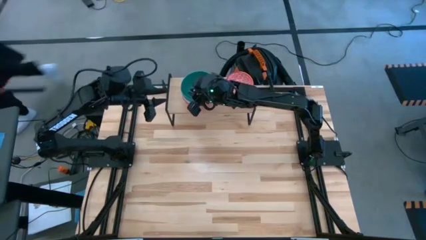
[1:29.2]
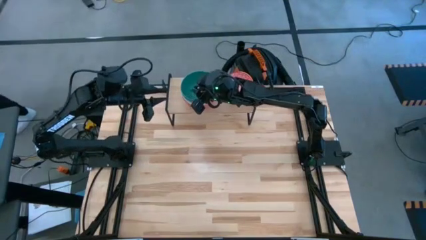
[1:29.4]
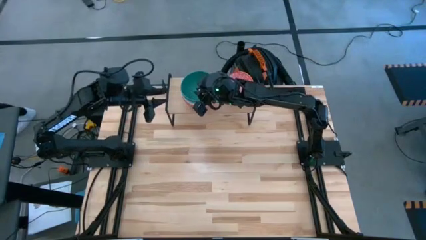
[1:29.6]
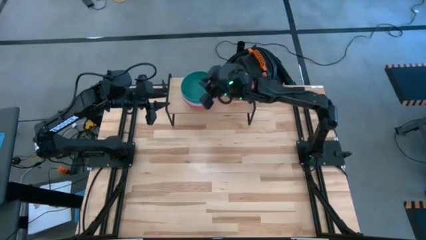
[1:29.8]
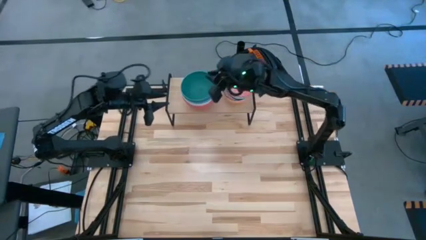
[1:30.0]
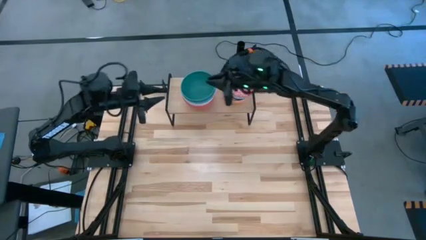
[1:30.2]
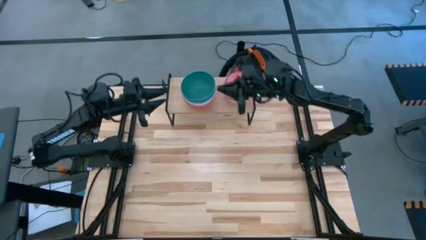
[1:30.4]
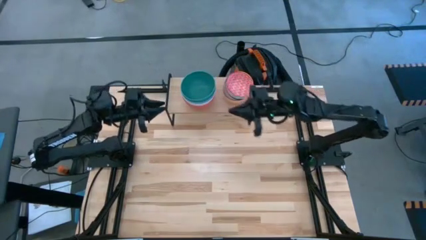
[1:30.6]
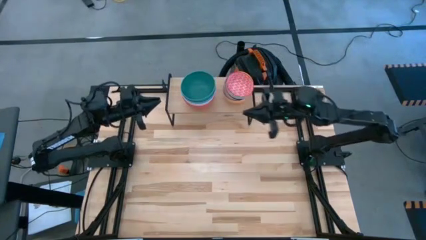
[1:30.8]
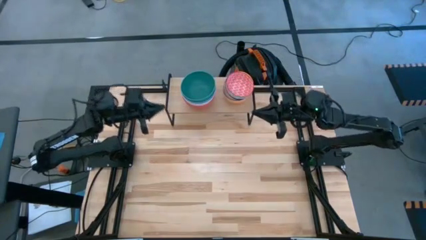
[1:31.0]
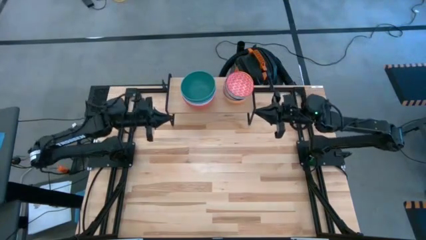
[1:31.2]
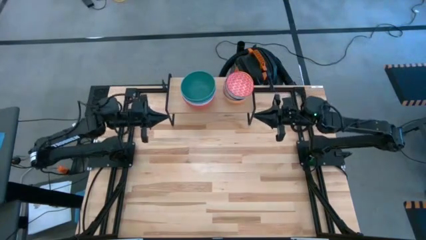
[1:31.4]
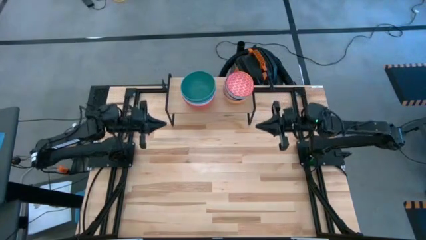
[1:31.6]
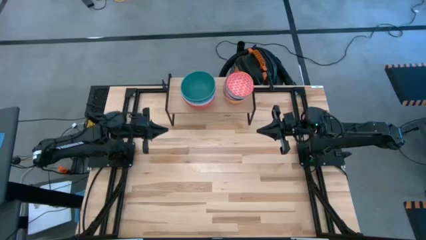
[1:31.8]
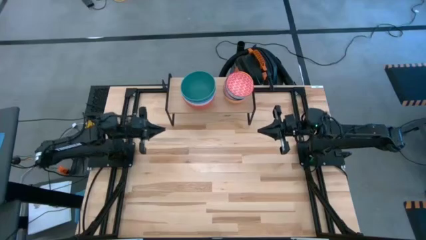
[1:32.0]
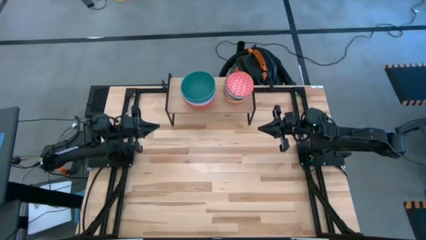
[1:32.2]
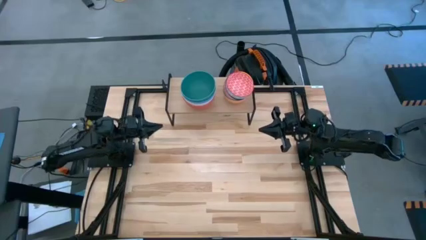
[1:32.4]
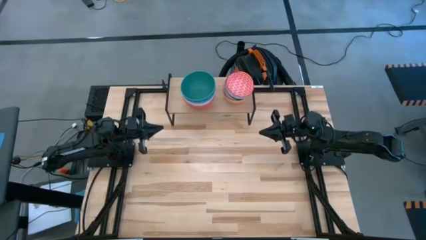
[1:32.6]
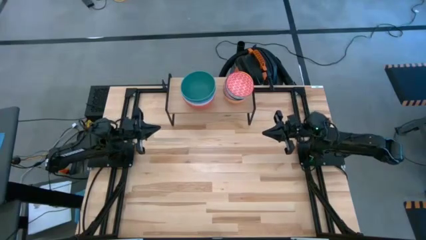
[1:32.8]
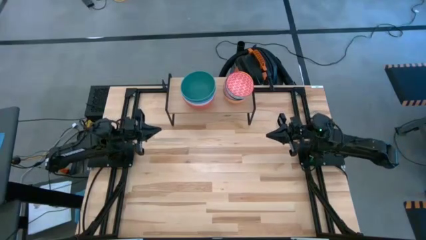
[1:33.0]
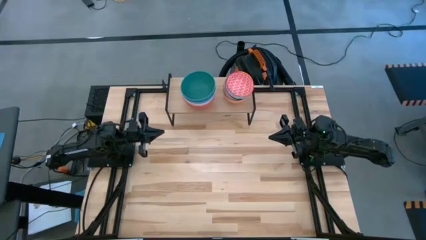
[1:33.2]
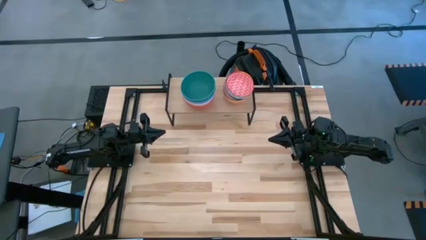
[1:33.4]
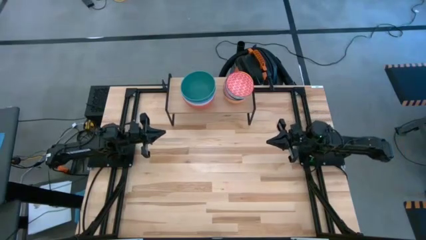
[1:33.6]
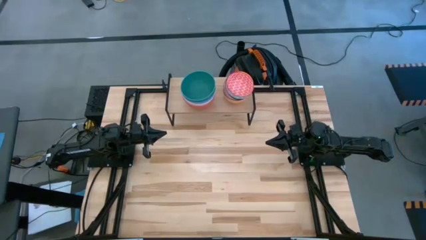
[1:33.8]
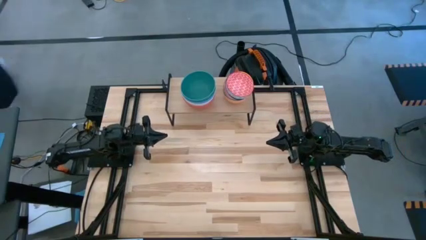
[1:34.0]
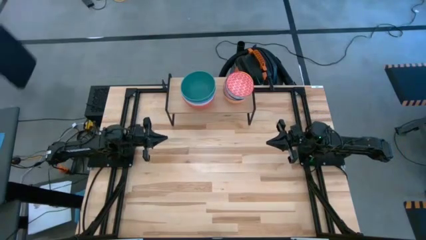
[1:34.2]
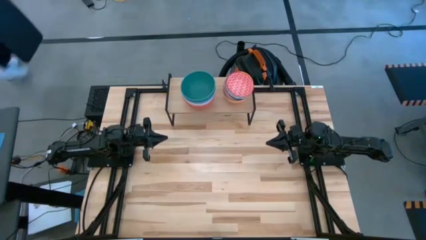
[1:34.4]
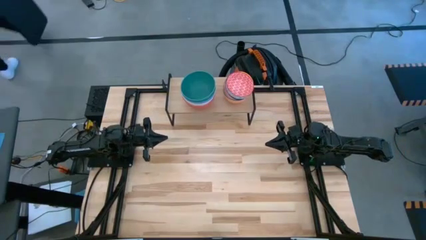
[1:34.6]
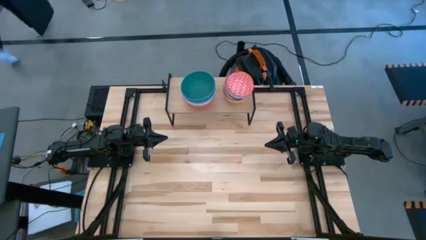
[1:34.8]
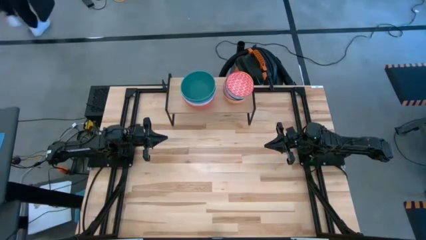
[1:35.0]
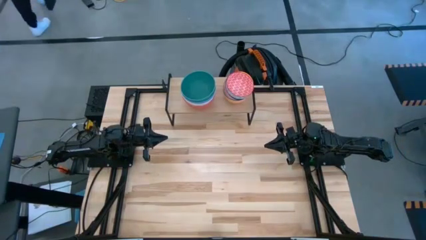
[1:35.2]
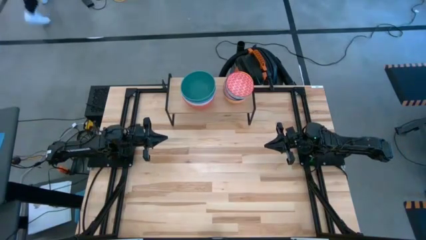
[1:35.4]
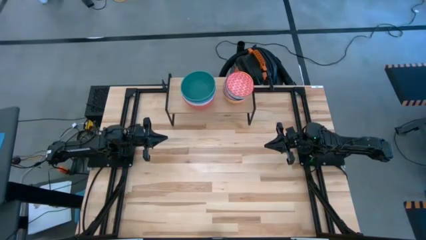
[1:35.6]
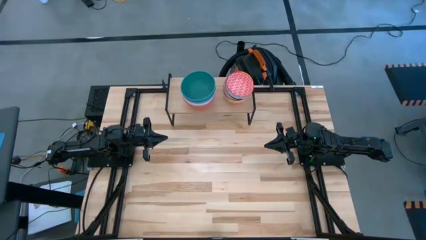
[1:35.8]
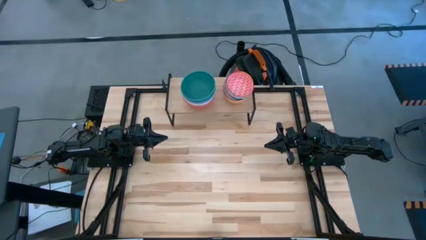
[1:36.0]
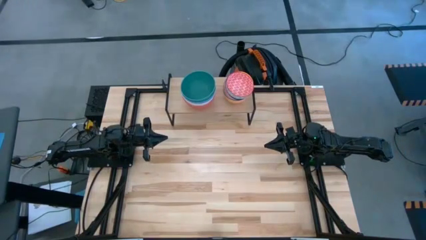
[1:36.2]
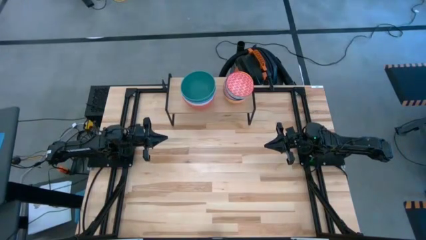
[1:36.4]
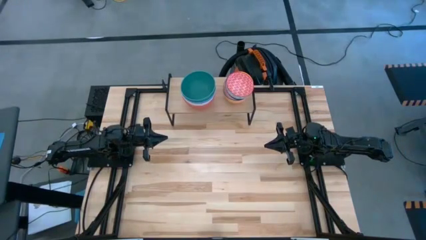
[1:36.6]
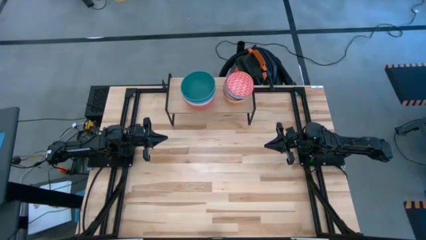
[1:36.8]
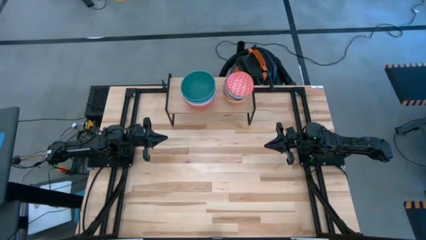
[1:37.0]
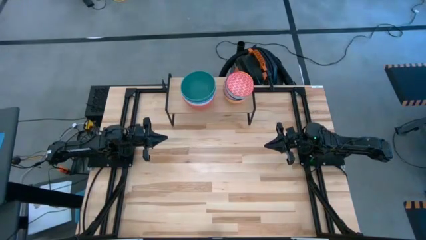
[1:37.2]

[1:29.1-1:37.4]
Task: Place and stack bowls onto a shelf
Return to Home Position

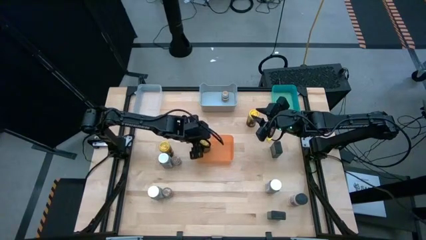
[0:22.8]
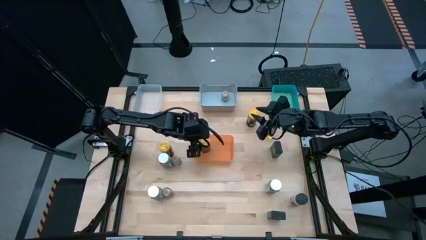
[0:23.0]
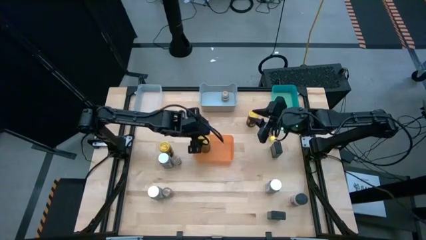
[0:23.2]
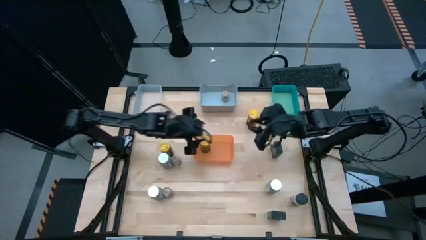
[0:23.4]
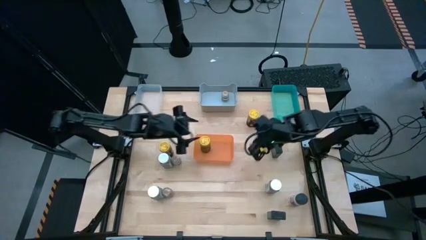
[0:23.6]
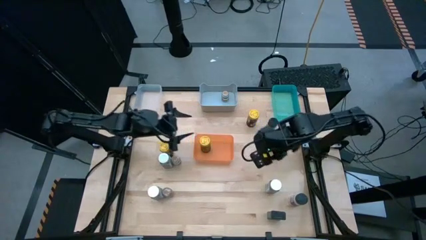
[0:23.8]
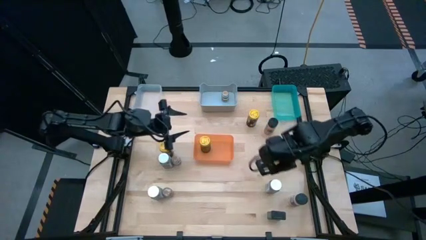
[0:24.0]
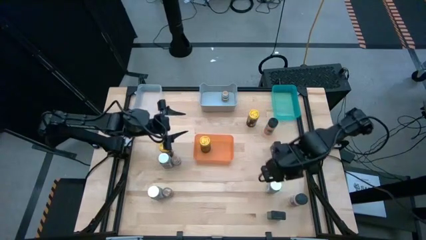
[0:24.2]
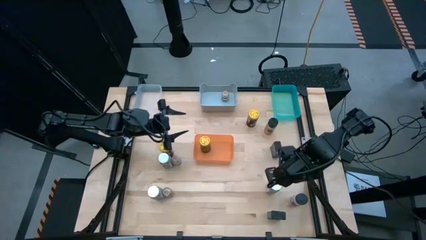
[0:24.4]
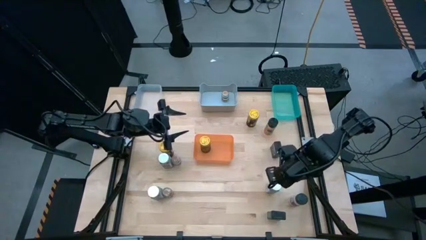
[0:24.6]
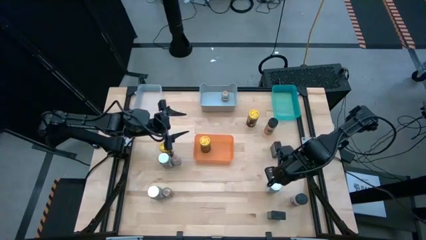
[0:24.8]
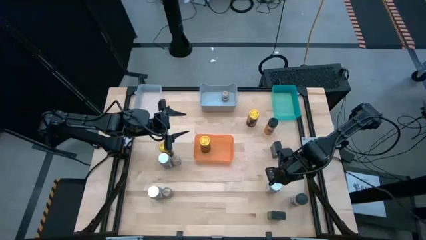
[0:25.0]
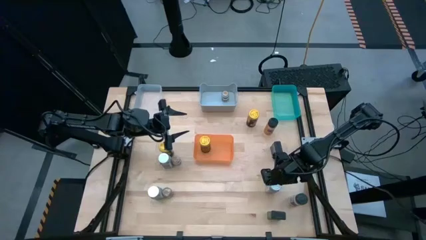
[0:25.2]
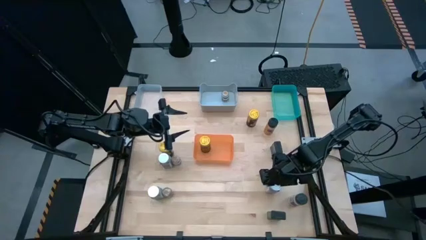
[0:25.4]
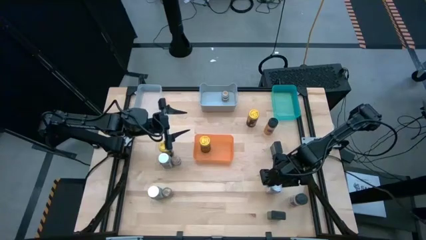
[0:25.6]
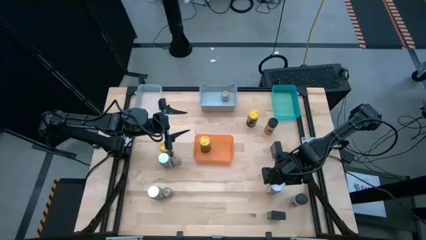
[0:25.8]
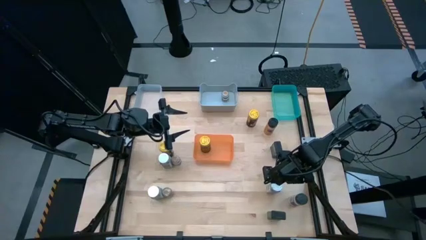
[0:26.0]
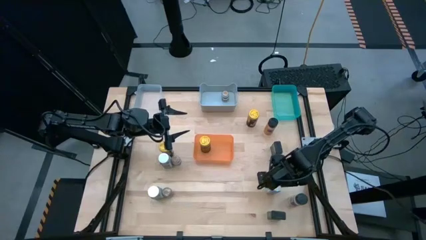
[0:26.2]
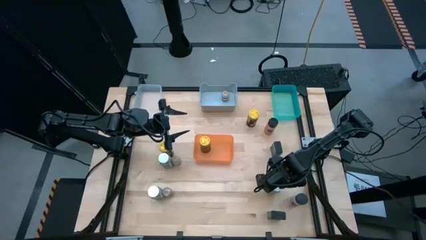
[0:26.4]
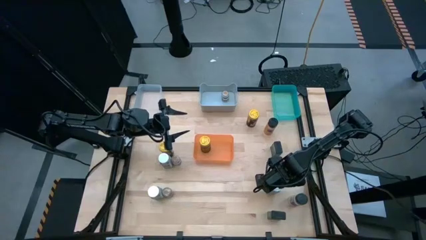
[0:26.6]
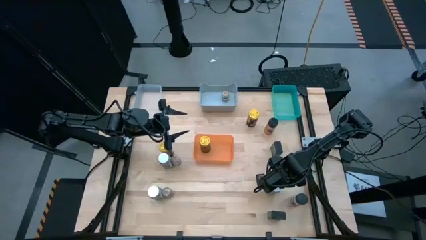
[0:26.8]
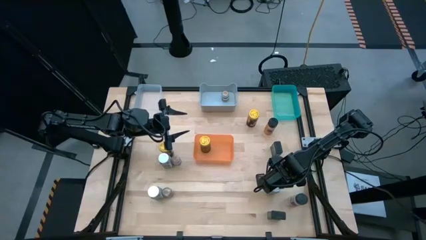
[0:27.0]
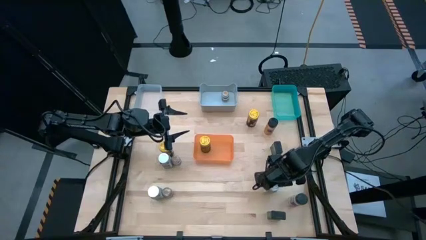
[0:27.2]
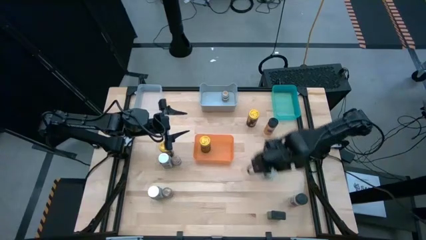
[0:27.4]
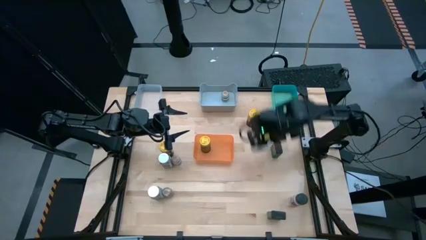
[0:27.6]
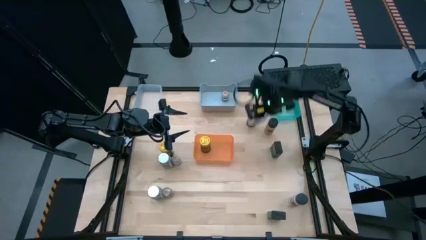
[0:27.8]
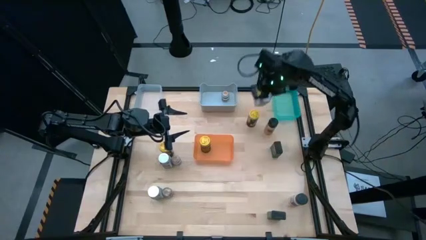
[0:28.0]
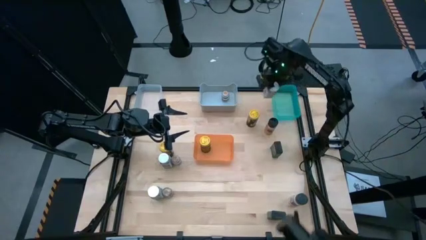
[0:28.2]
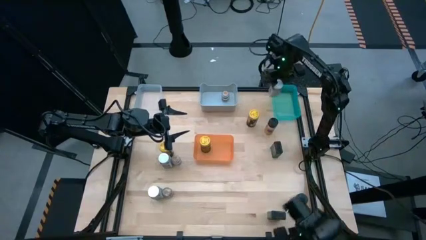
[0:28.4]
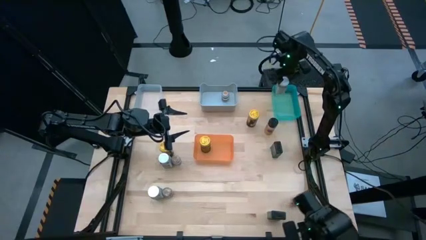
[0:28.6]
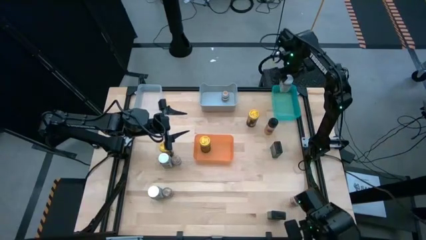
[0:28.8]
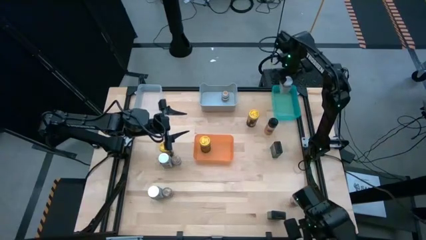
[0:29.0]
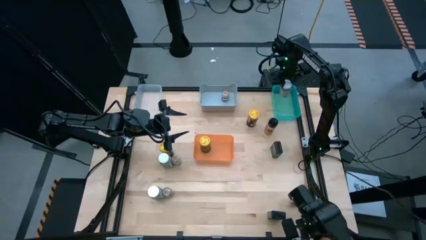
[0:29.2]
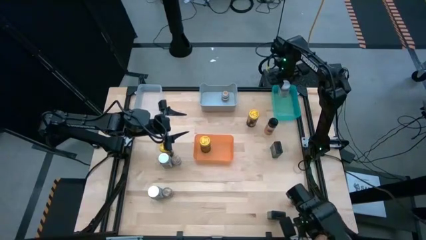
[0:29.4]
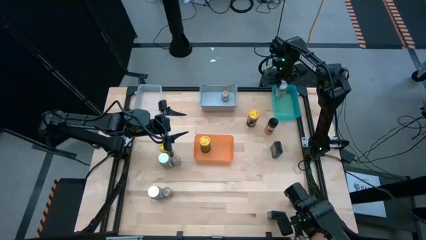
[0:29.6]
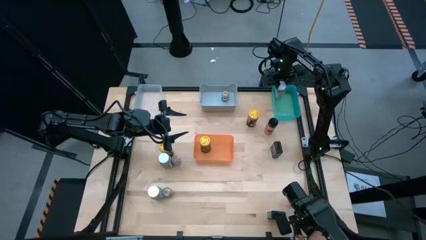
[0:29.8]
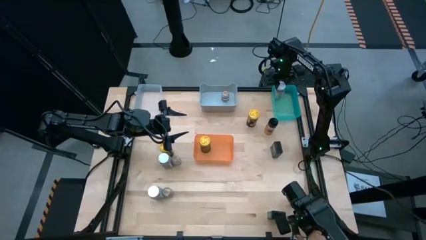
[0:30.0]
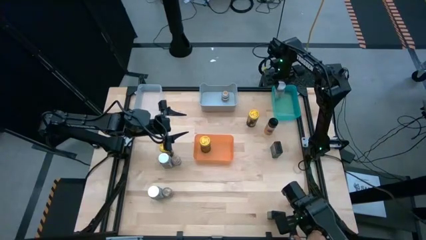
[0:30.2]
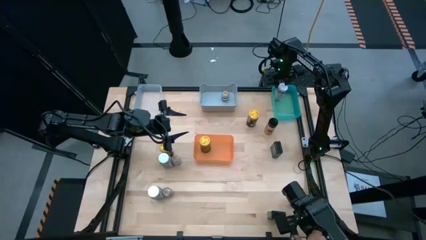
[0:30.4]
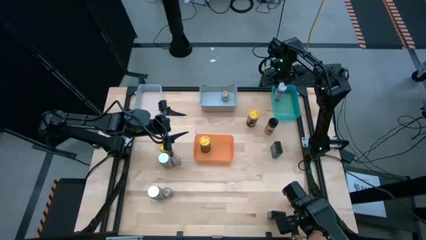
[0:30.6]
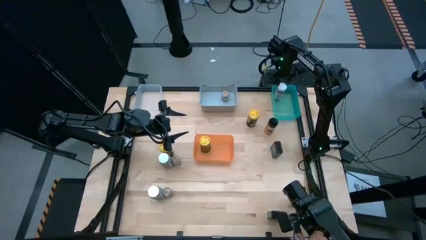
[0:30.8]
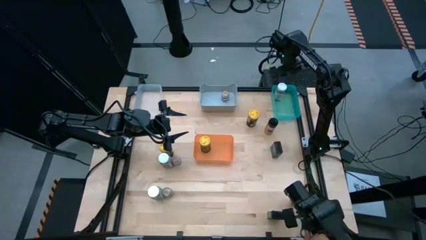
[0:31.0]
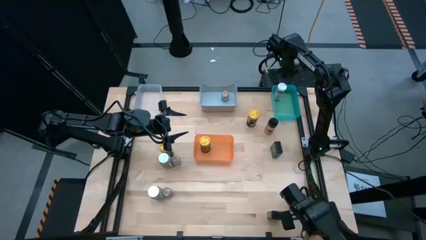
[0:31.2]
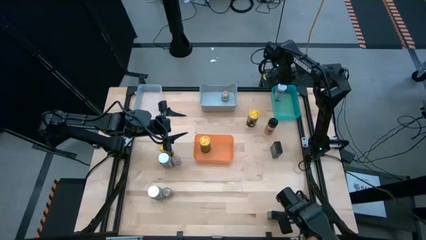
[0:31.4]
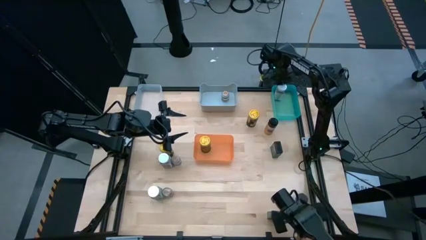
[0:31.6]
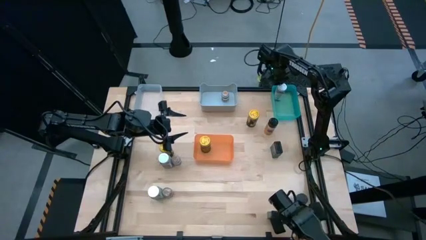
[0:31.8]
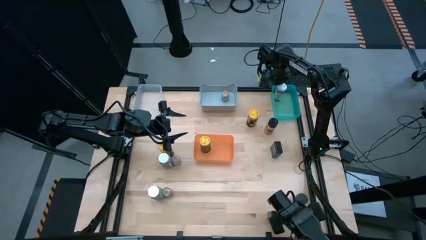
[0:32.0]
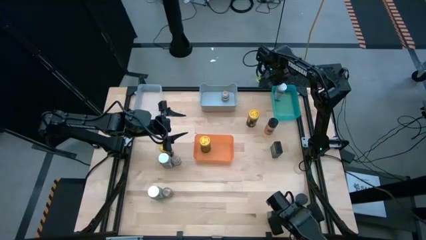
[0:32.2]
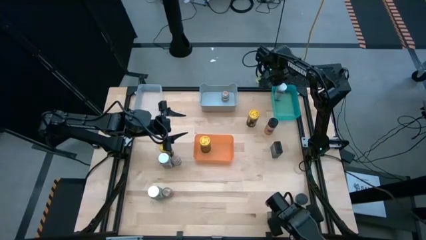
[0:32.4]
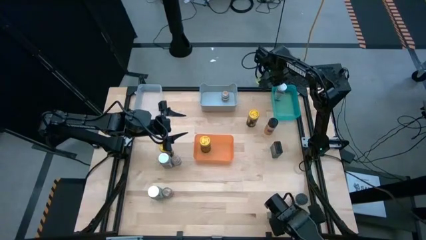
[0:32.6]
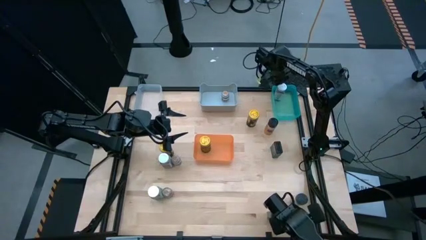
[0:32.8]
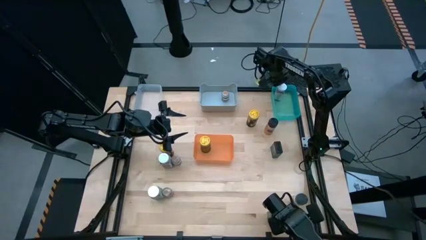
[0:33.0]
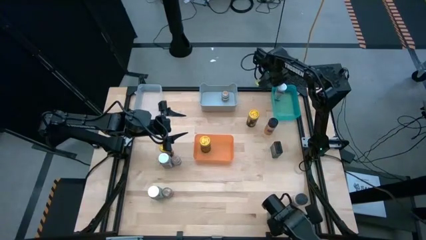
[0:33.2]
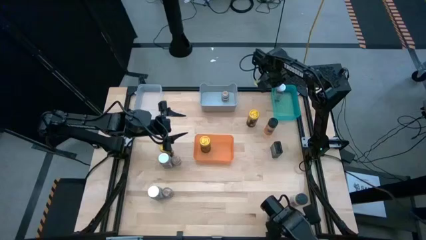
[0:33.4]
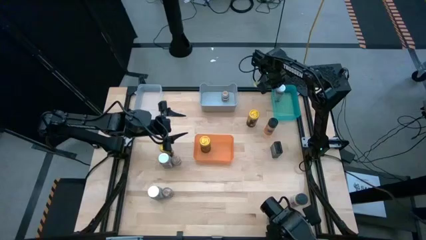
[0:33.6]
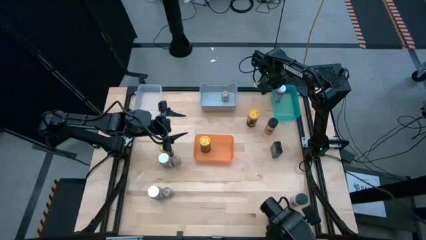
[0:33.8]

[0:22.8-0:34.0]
Task: Sort spices by type
Put the bottom right white seasoning bottle into the green bin
